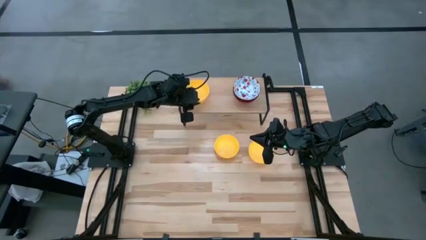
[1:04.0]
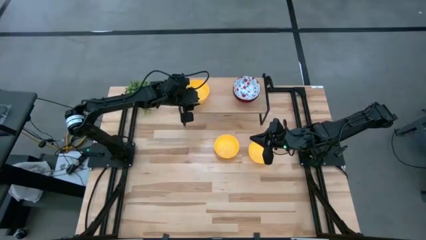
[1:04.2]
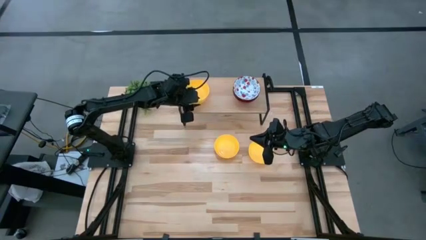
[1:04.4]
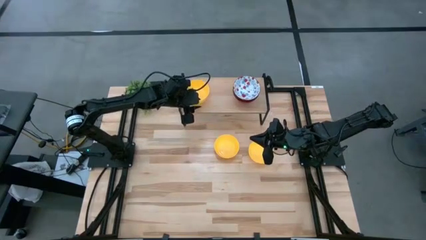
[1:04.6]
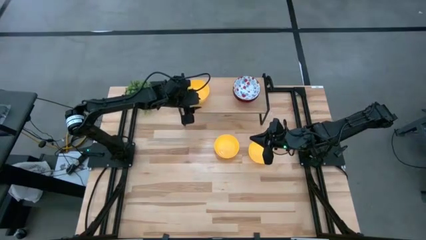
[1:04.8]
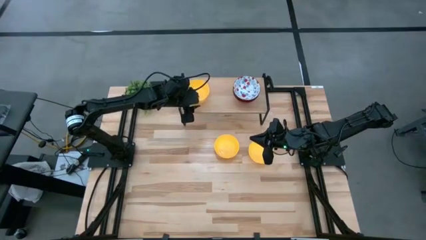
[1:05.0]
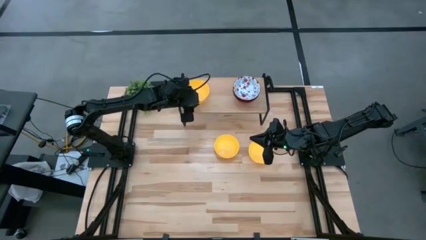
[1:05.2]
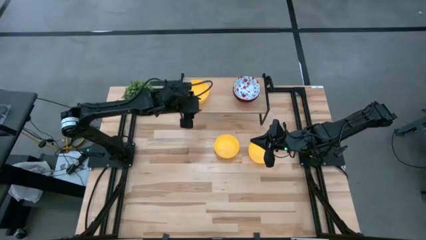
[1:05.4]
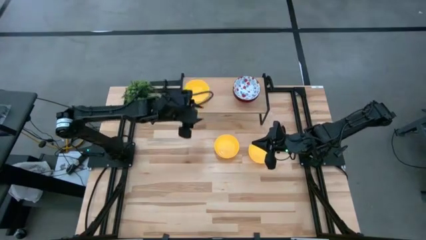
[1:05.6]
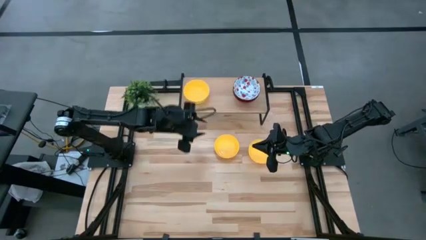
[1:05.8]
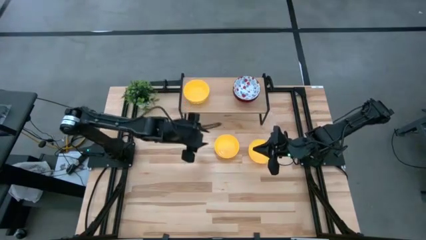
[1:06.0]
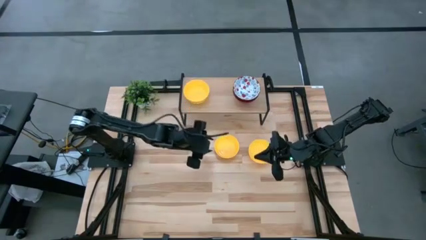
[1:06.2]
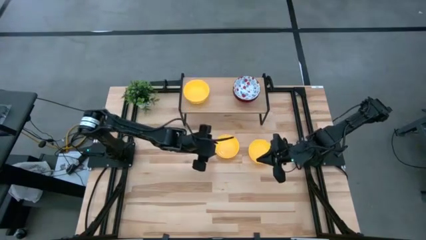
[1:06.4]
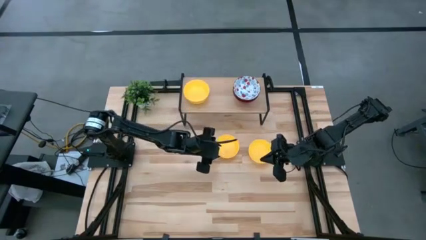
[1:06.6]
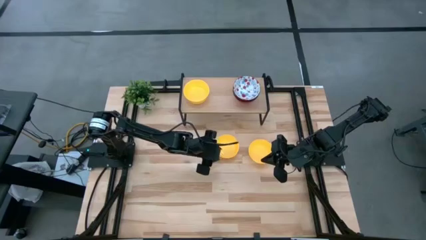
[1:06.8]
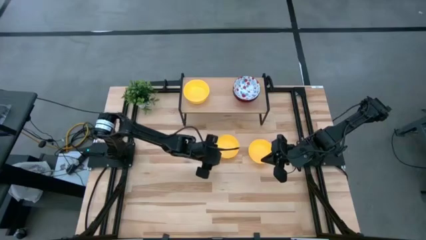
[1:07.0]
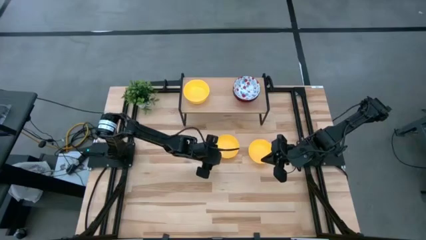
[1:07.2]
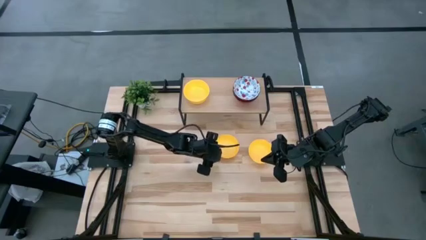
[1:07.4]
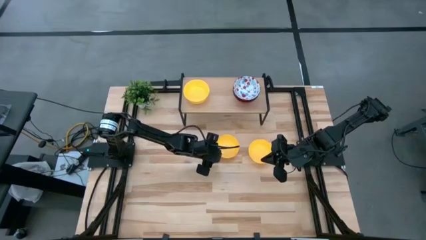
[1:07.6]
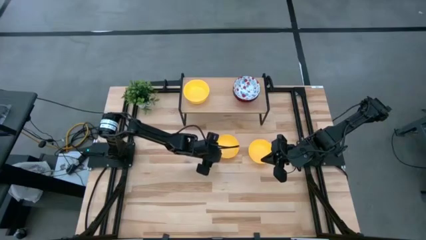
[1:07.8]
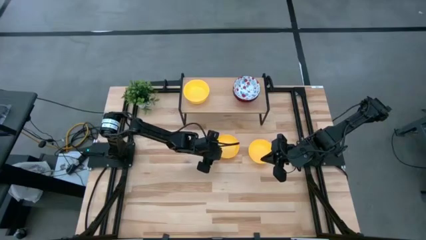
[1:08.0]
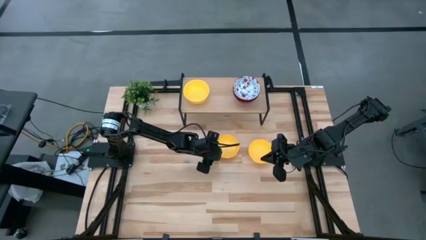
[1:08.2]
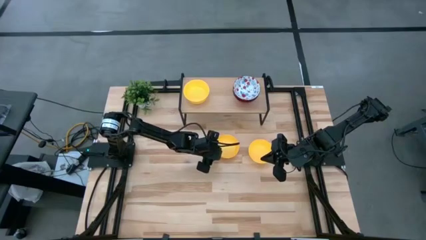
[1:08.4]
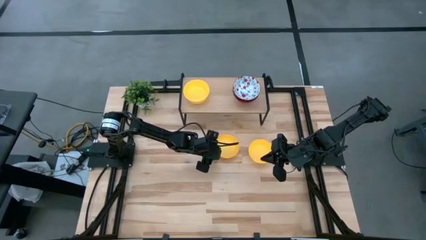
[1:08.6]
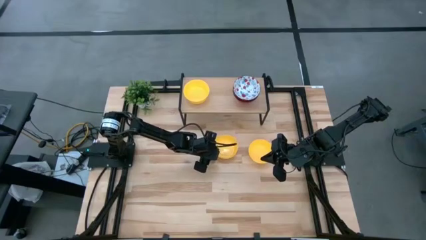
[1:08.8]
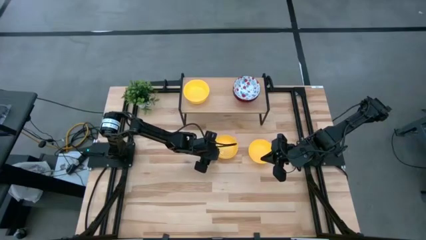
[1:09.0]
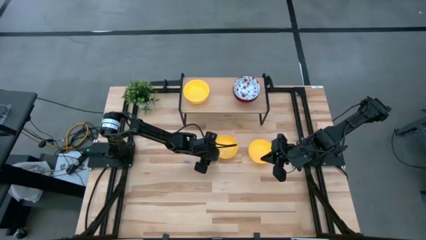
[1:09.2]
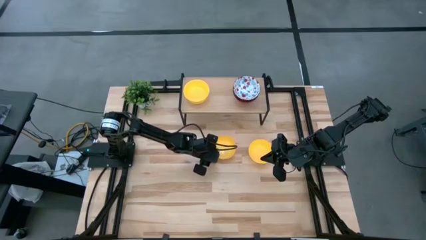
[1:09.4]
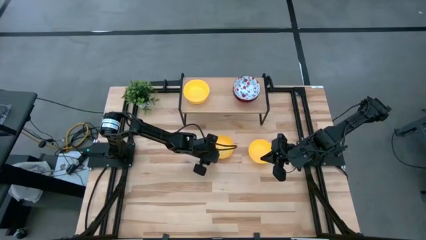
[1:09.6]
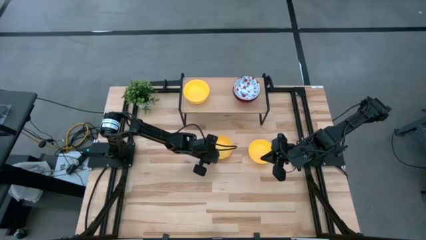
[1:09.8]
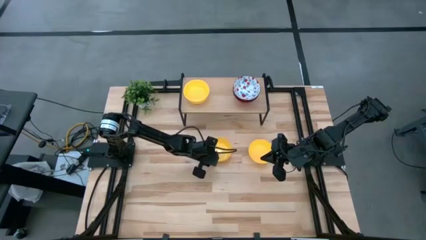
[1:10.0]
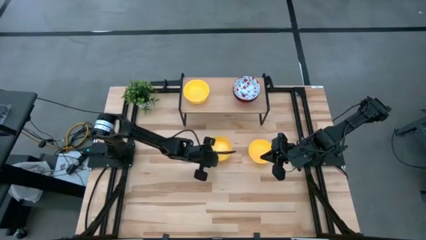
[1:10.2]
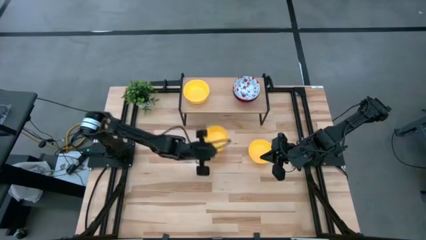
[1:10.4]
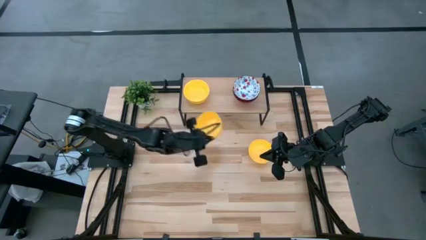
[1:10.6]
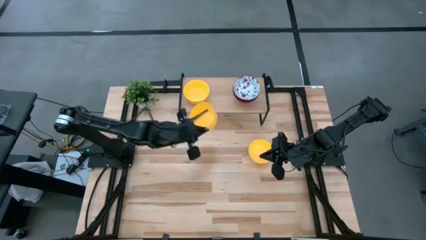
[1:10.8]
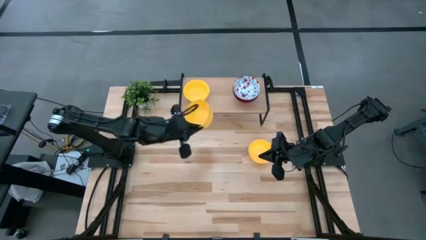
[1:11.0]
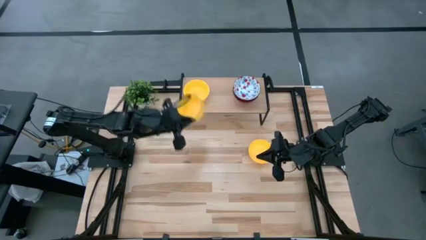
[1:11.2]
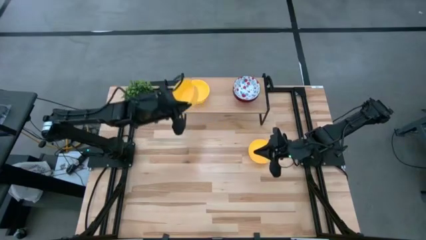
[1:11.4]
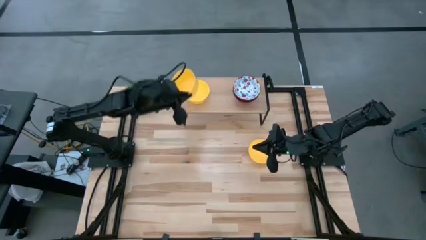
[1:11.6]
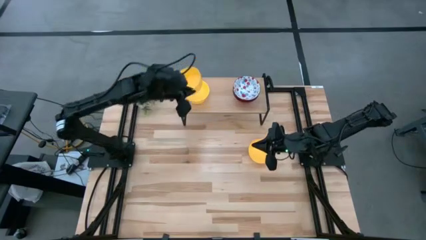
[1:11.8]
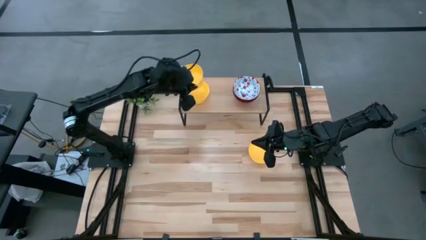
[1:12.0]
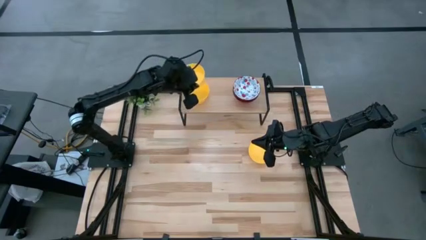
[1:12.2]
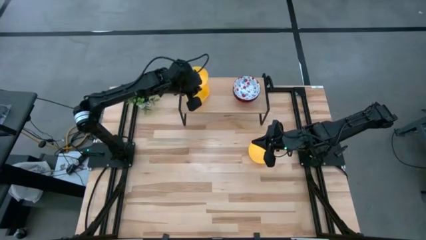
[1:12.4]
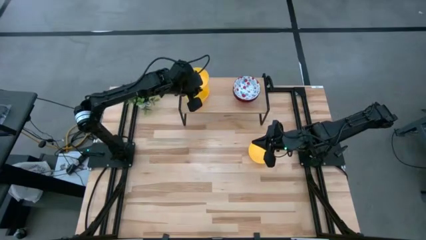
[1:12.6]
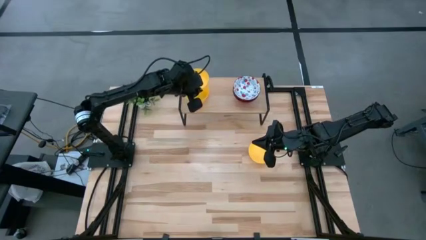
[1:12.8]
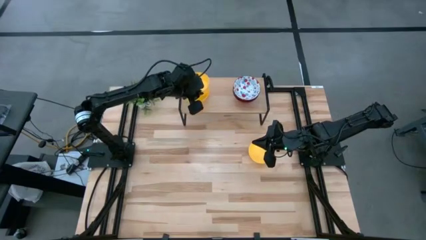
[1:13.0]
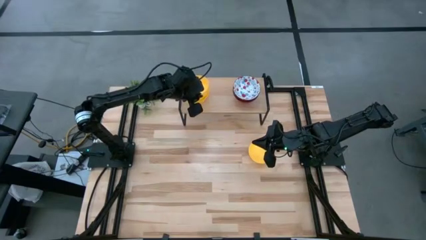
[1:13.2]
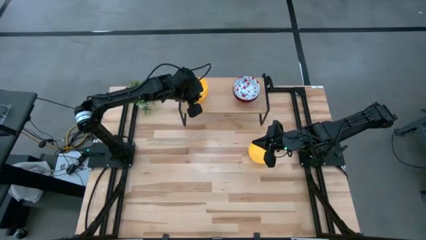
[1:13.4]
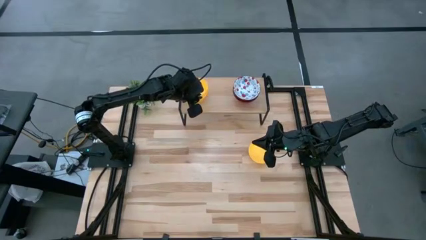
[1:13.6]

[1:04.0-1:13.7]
Task: Pick & Place Mini bowls
Stack the left yellow bowl on top of the yellow bowl on the shelf

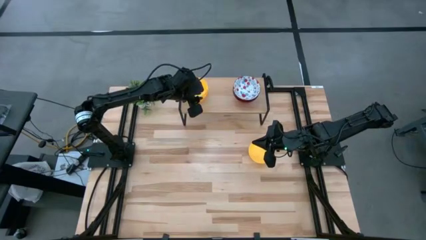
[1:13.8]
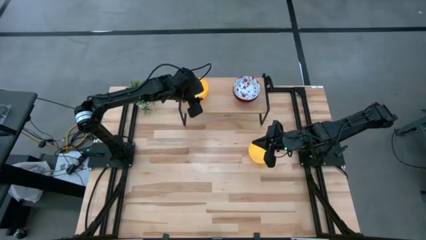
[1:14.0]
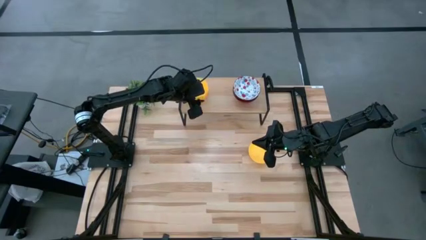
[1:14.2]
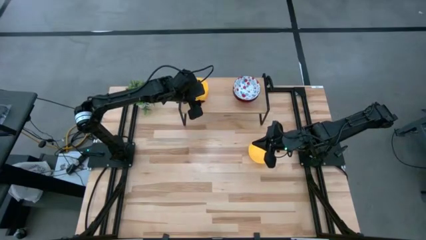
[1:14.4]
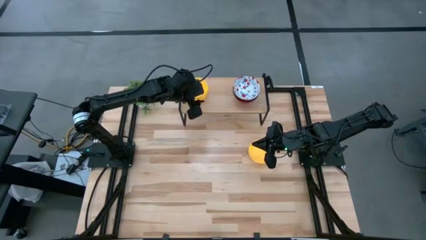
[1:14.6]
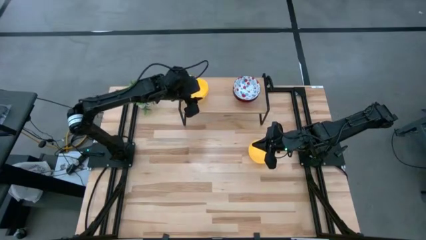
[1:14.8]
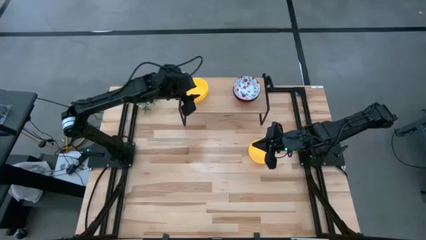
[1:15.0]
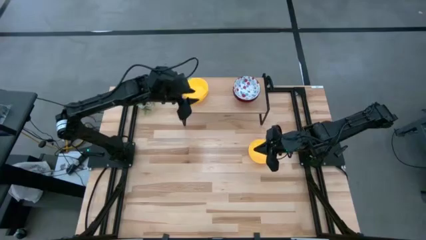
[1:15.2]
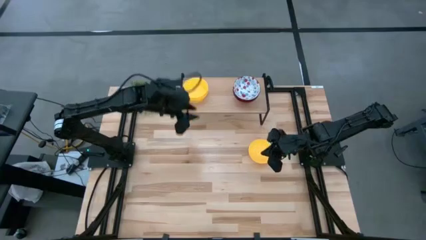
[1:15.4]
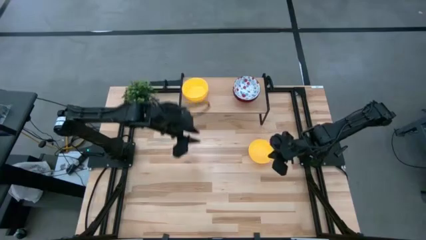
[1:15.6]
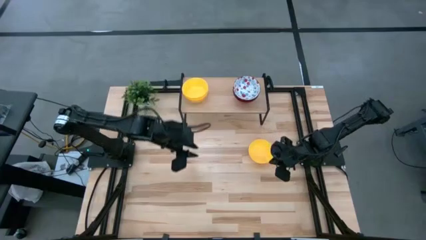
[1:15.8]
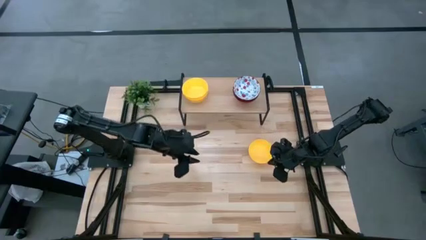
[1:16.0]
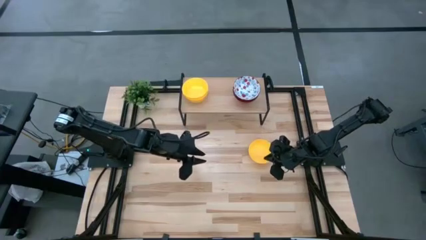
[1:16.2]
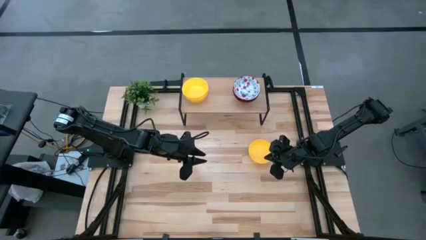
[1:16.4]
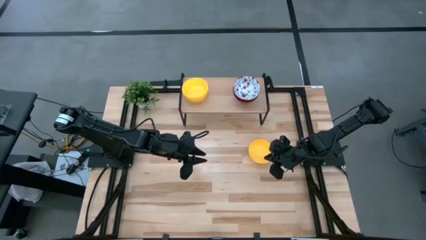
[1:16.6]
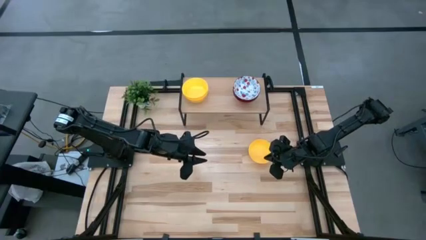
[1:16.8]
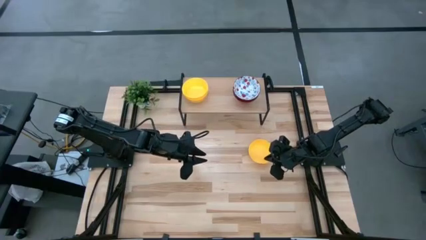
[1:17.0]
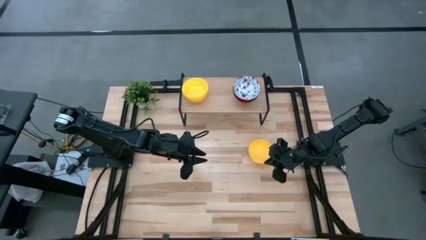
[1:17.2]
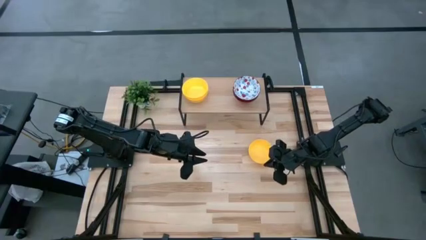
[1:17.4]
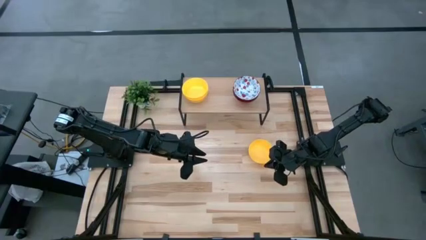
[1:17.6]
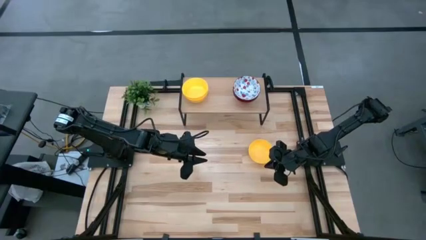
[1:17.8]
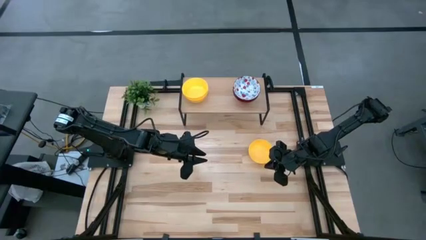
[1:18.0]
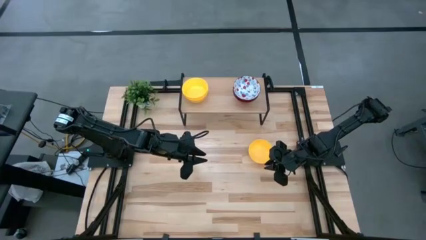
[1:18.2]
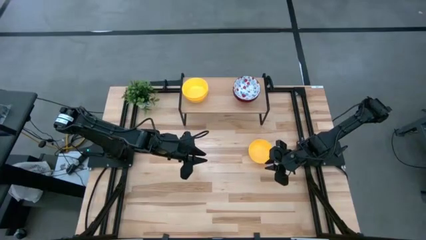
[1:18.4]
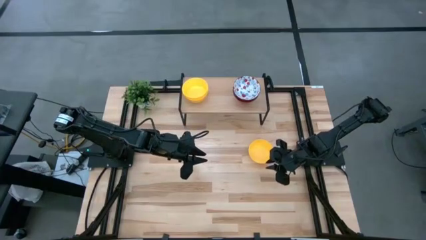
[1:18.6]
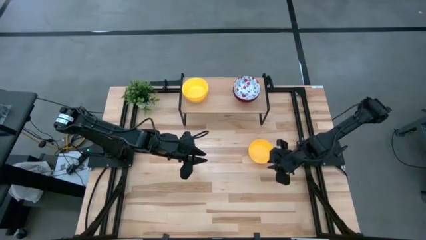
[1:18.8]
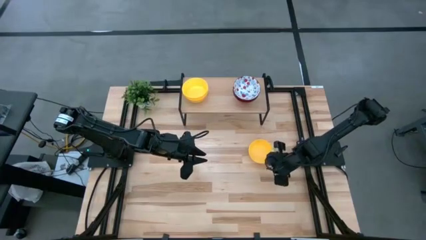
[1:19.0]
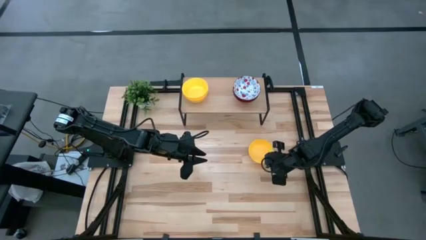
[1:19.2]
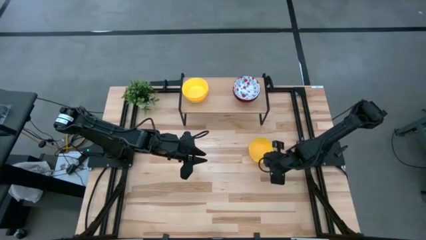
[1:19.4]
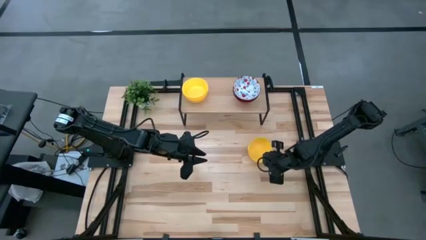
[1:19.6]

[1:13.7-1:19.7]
Stack the yellow bowl on top of the stacked yellow bowls on the shelf
